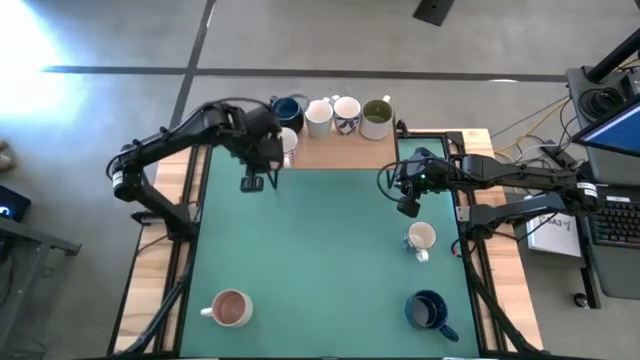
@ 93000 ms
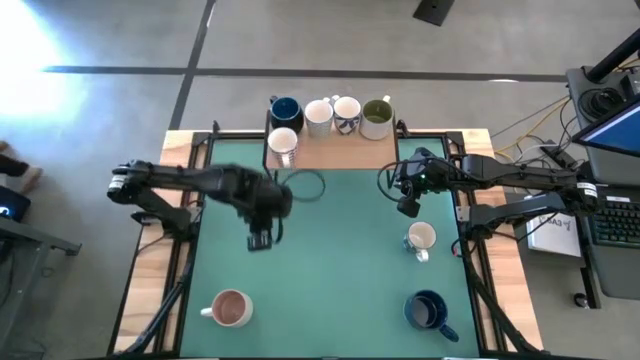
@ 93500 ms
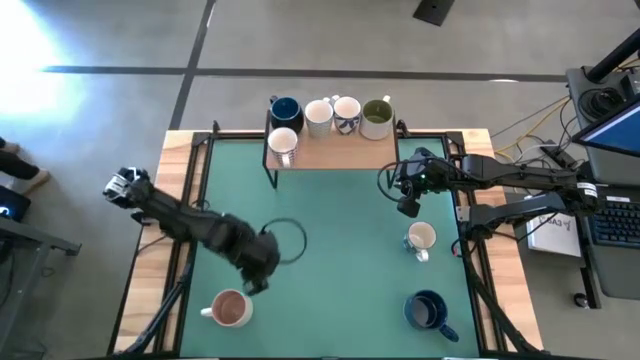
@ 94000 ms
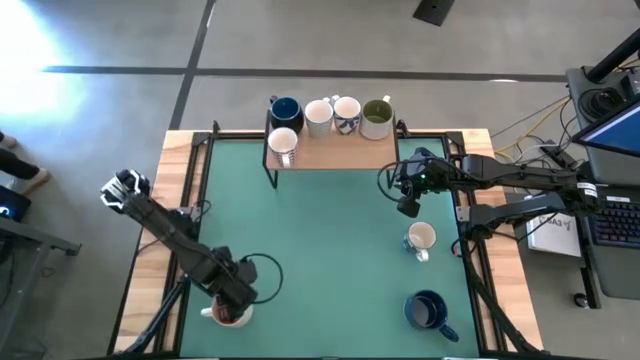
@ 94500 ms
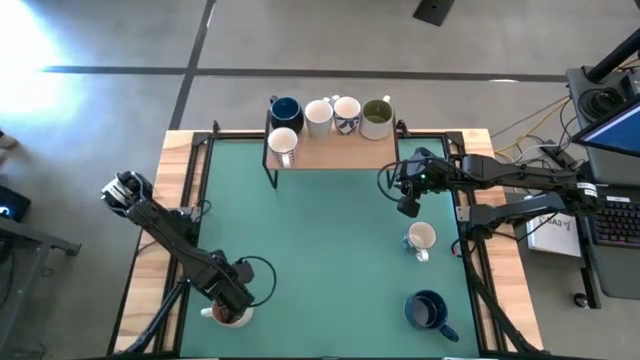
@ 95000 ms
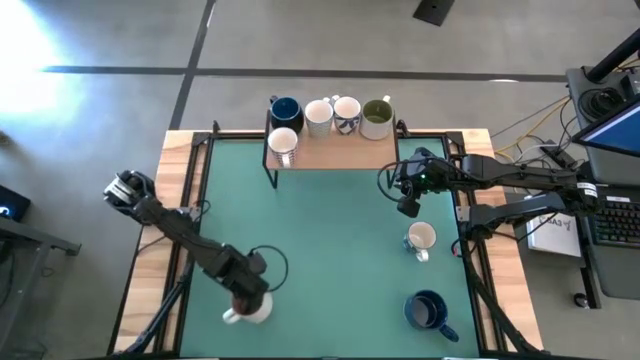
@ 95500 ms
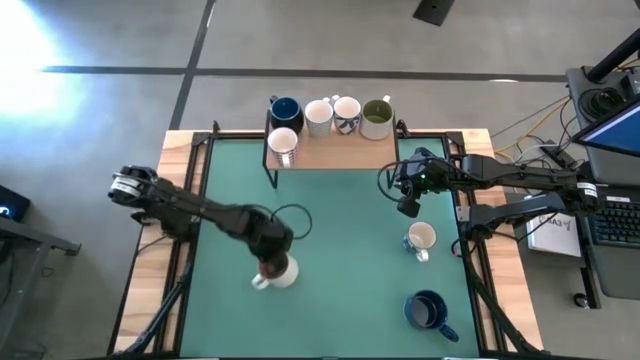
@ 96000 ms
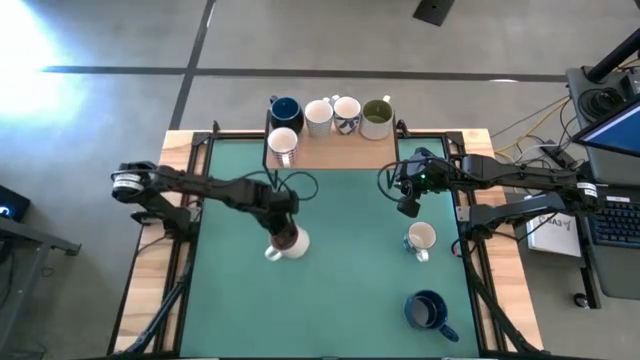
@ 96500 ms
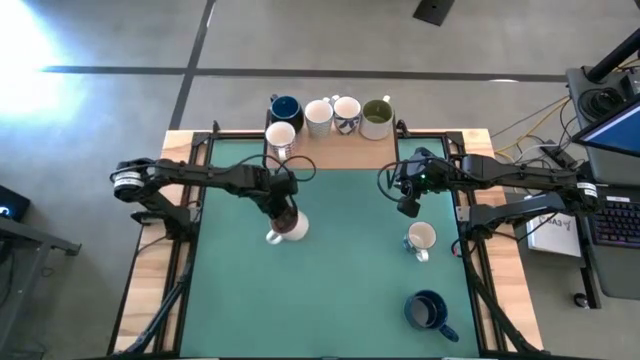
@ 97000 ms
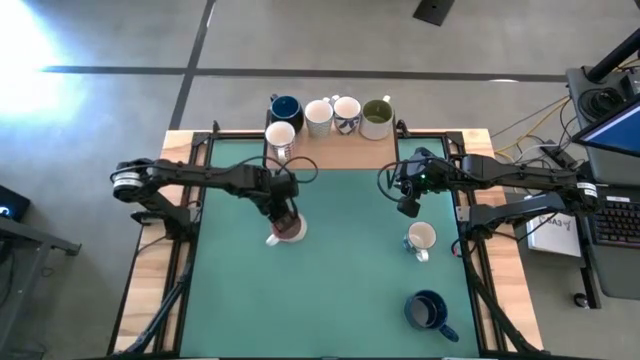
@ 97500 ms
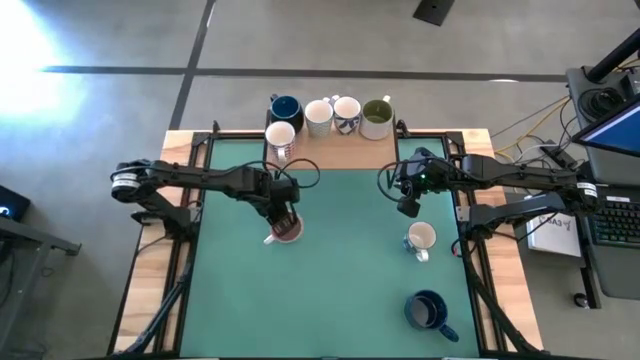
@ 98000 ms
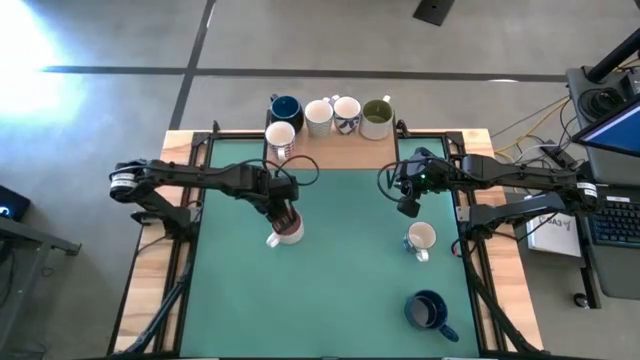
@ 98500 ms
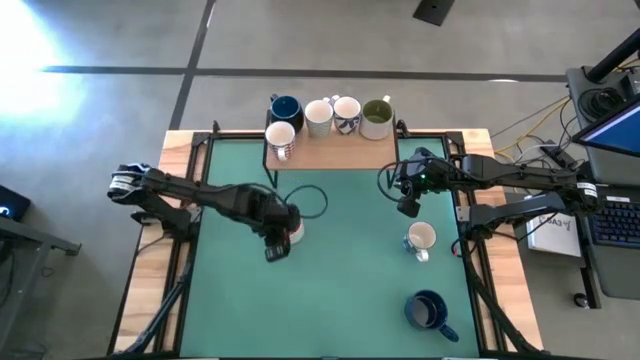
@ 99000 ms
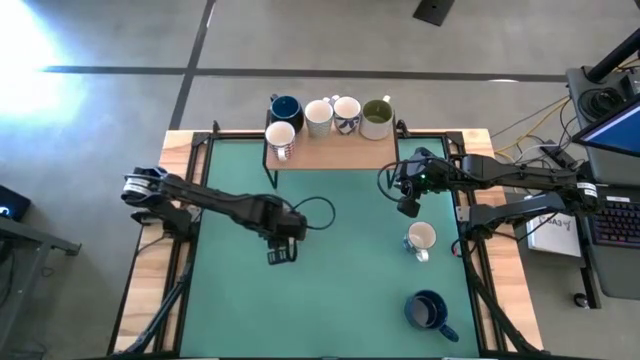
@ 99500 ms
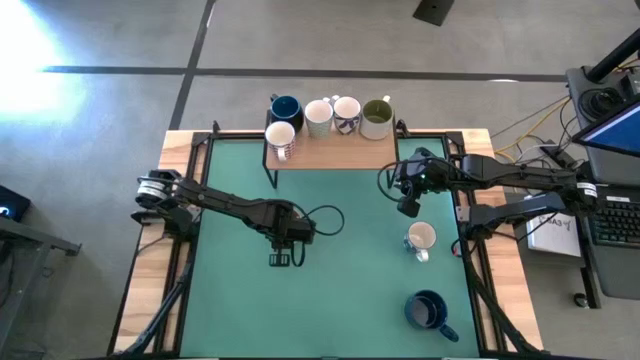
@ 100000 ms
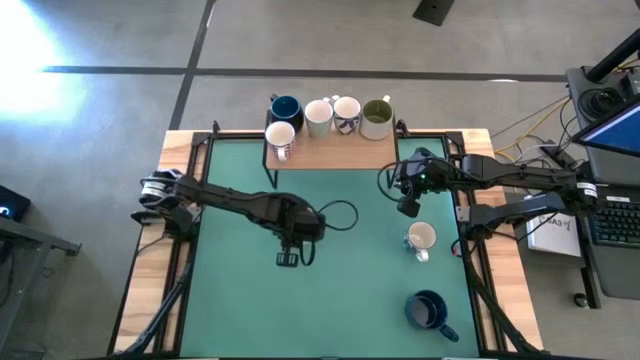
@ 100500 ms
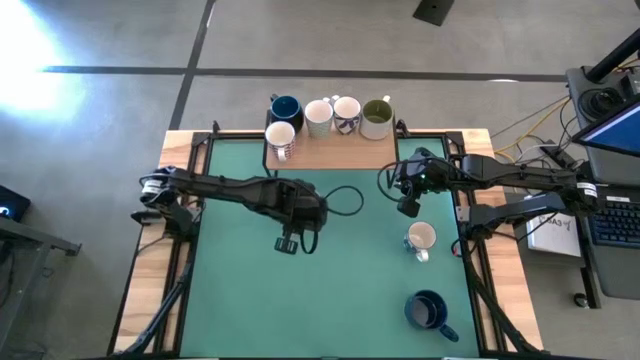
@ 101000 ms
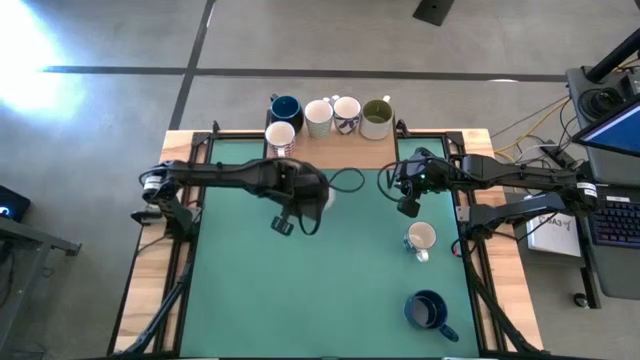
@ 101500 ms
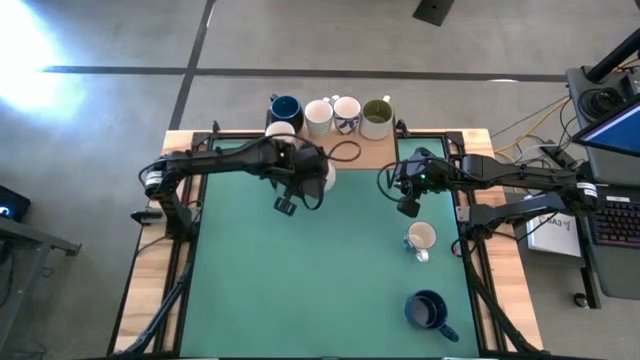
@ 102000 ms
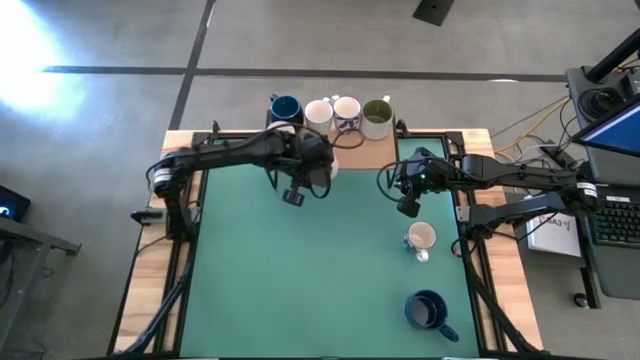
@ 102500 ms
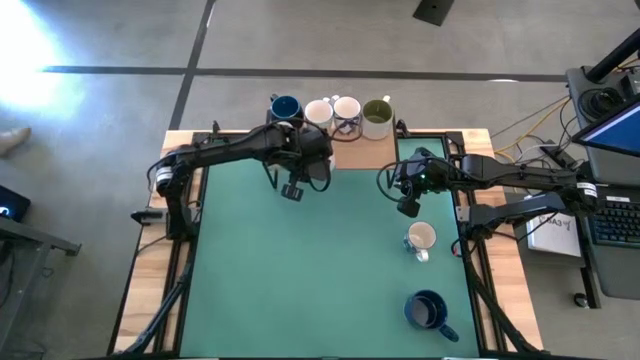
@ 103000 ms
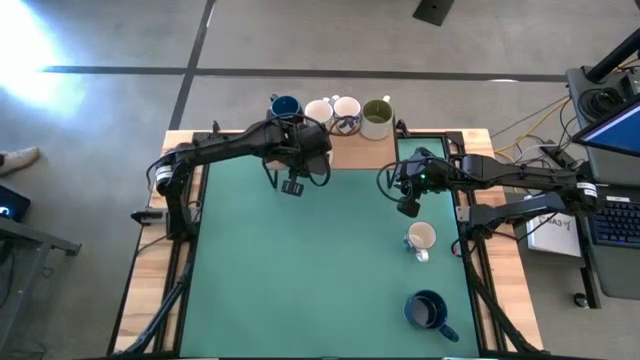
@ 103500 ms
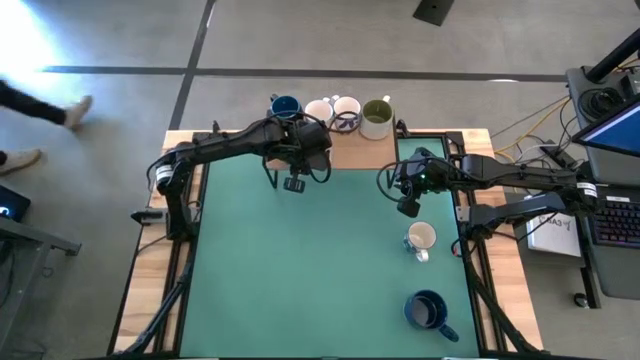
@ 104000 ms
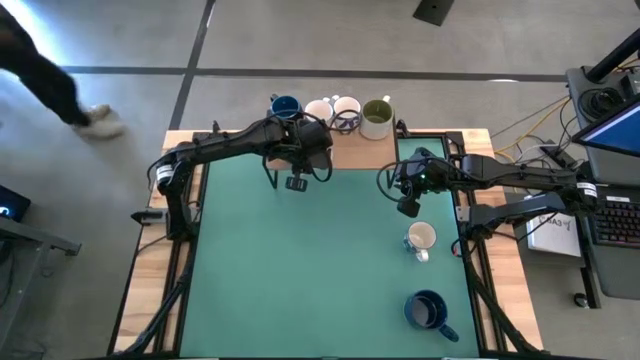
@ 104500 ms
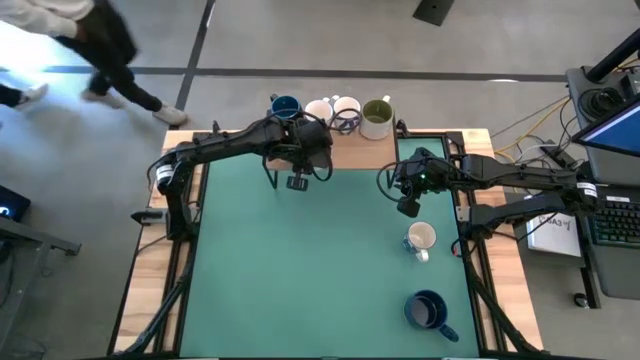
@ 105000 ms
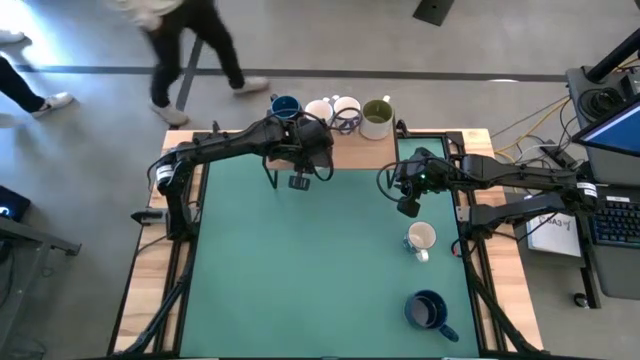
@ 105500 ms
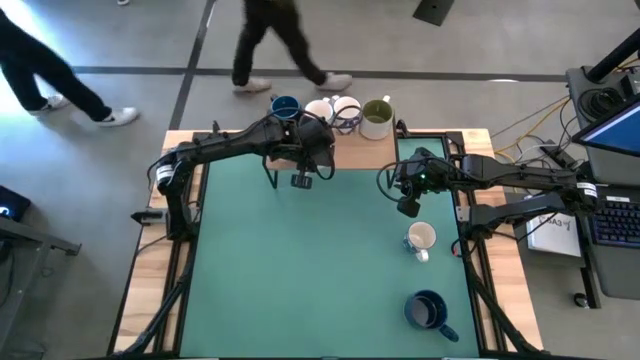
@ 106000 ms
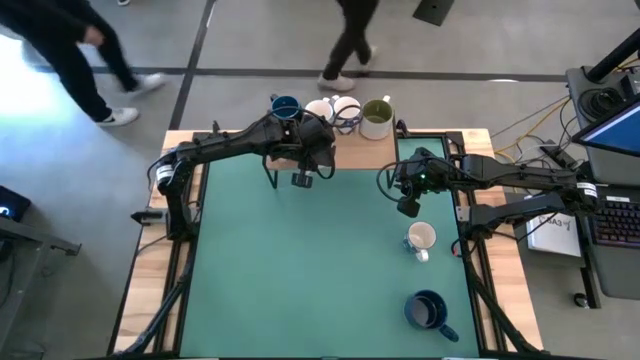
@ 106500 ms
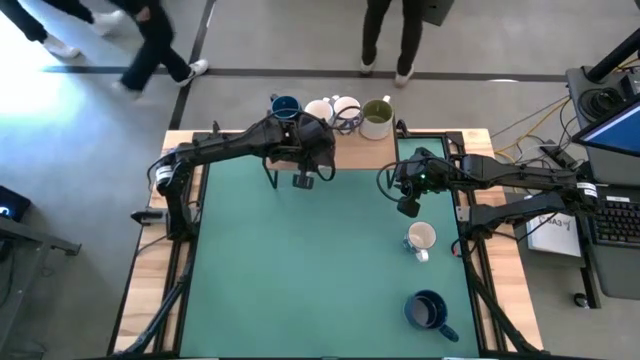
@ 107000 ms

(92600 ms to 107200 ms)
Task: Place coffee mugs
Put the brown mug on the shelf
